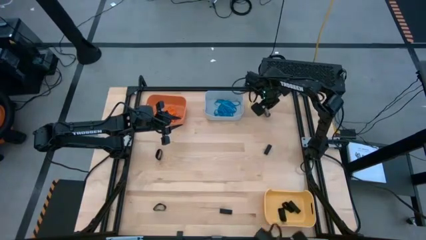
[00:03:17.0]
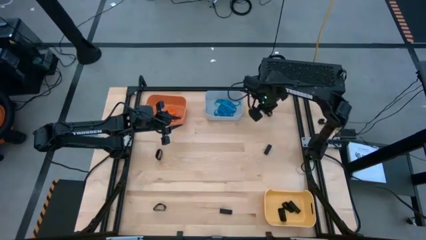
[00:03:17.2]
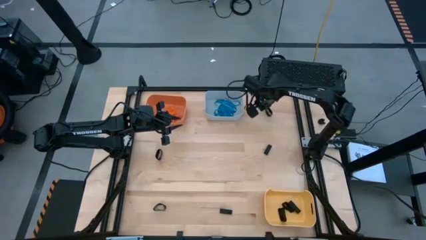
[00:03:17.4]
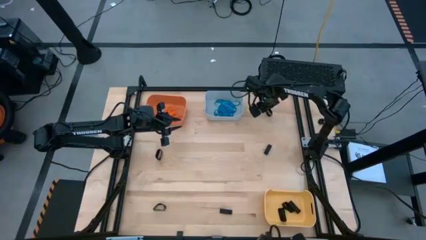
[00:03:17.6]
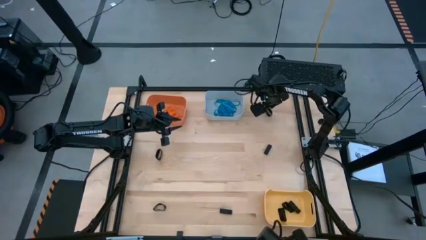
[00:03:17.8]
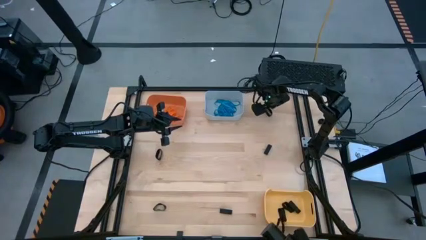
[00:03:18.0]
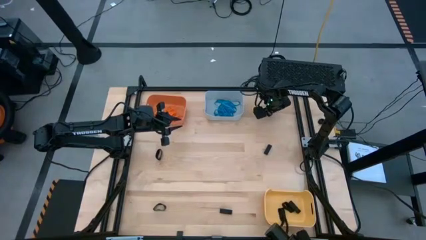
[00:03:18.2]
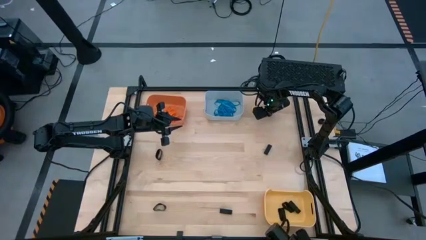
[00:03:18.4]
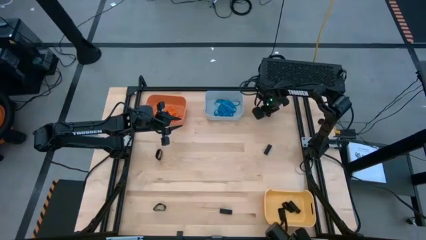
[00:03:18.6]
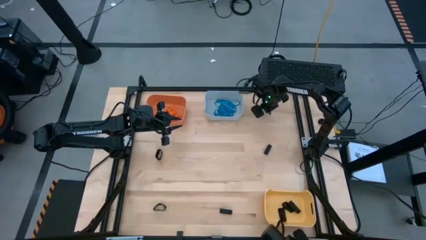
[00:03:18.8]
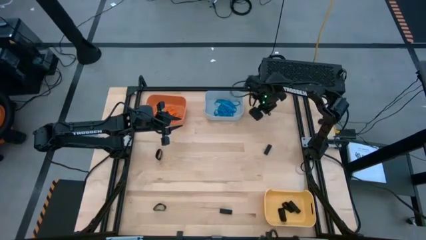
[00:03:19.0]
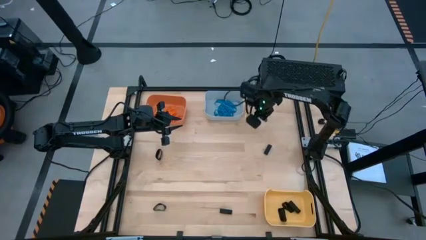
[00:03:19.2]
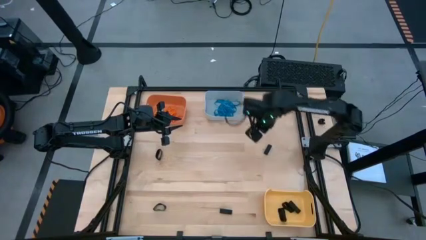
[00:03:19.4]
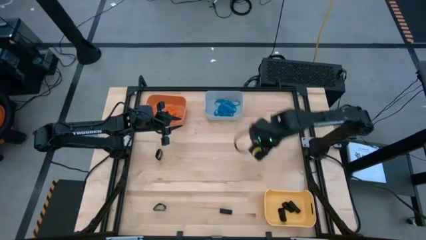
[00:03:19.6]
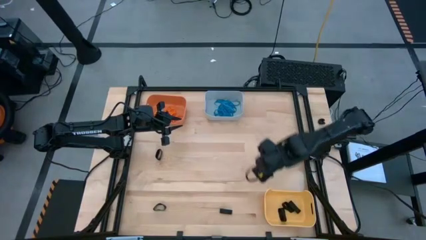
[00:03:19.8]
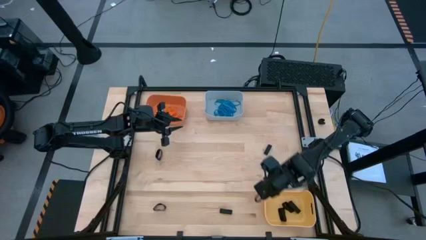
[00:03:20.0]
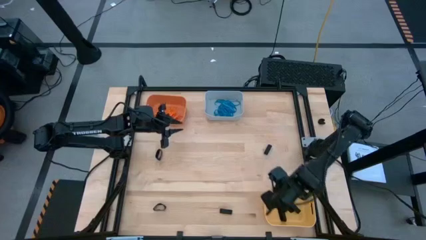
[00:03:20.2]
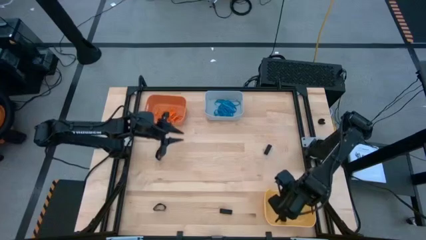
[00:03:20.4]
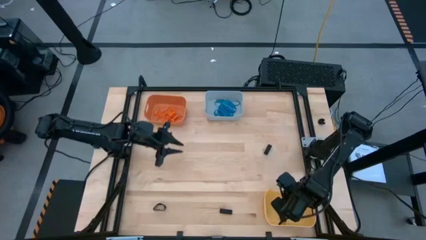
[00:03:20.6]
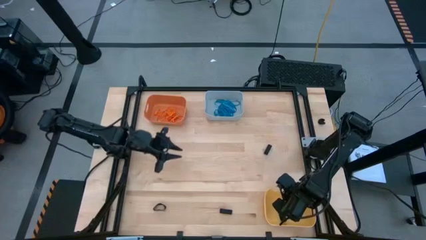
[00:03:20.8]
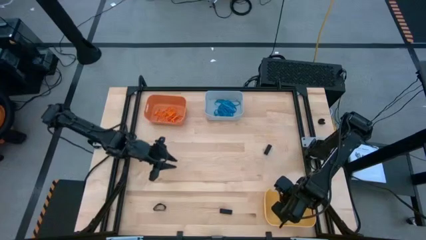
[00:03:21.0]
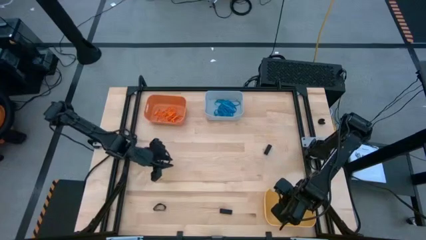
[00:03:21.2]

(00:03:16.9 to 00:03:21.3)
Task: Sort rubber bands into baskets
Put the black rubberband into the yellow bin

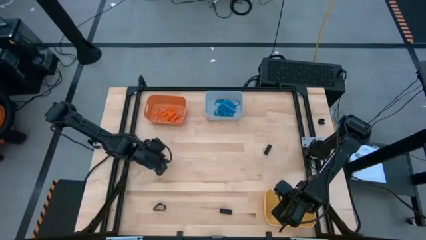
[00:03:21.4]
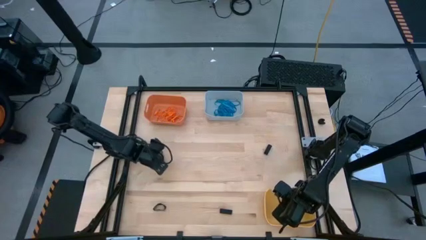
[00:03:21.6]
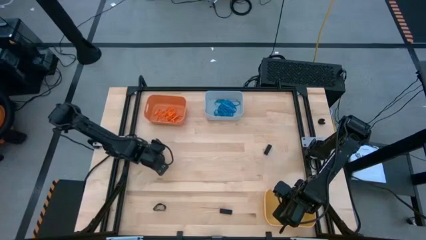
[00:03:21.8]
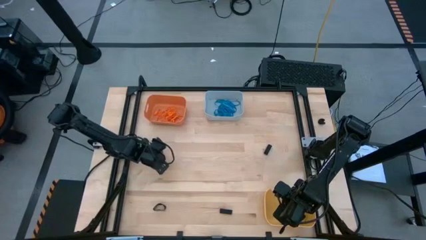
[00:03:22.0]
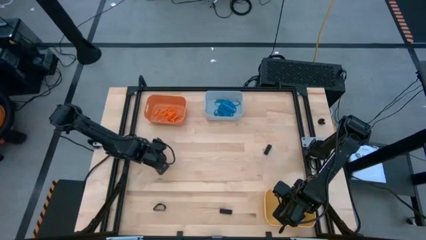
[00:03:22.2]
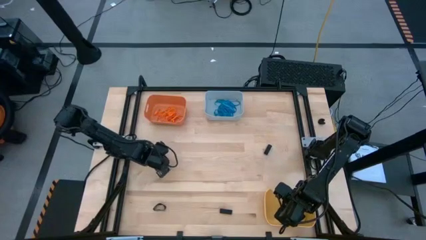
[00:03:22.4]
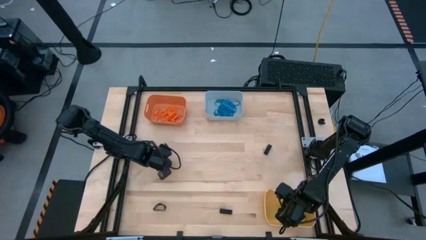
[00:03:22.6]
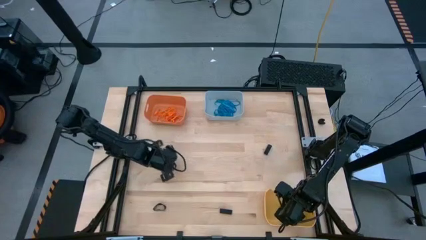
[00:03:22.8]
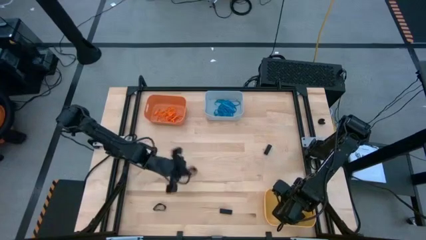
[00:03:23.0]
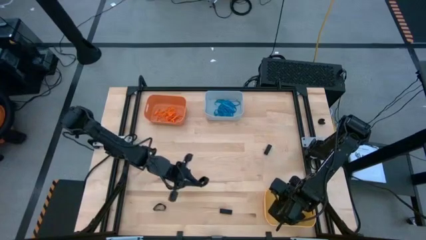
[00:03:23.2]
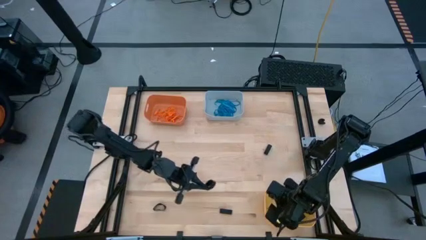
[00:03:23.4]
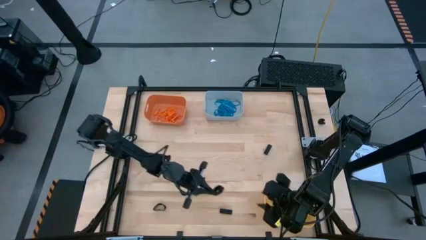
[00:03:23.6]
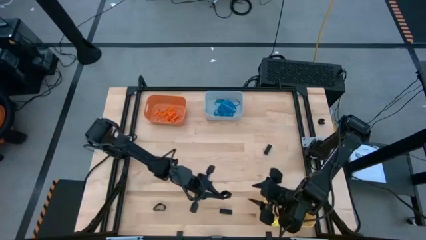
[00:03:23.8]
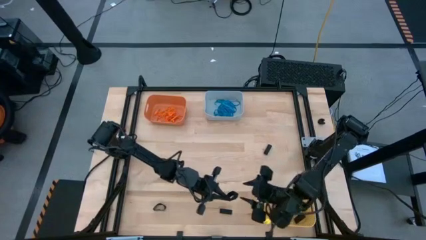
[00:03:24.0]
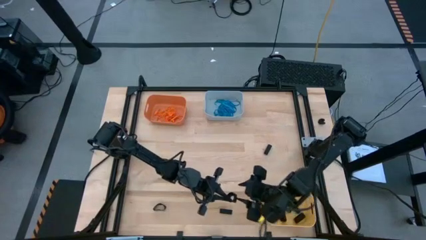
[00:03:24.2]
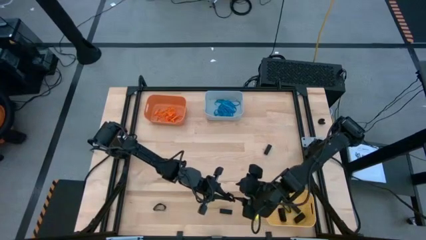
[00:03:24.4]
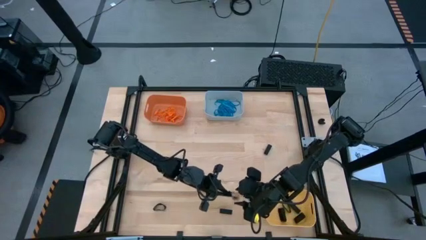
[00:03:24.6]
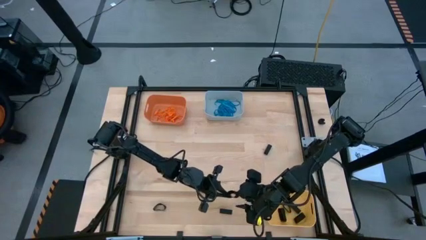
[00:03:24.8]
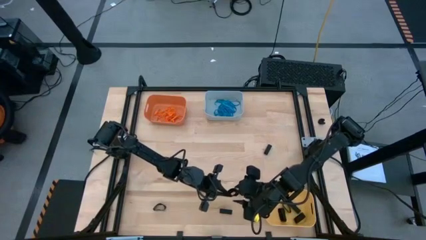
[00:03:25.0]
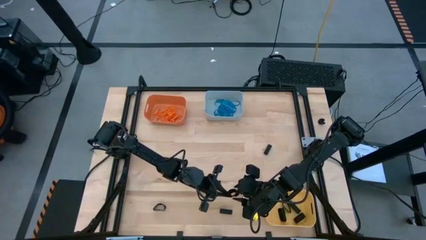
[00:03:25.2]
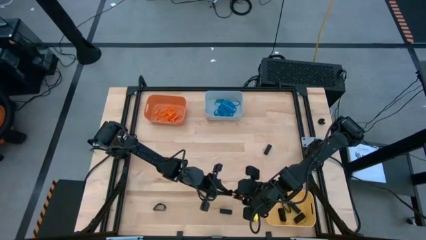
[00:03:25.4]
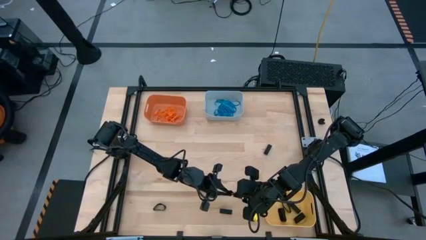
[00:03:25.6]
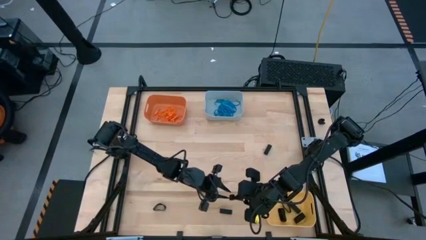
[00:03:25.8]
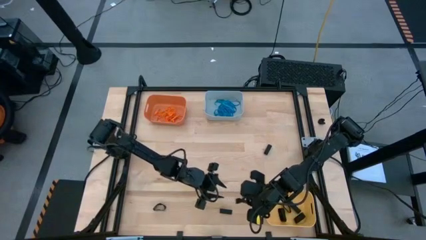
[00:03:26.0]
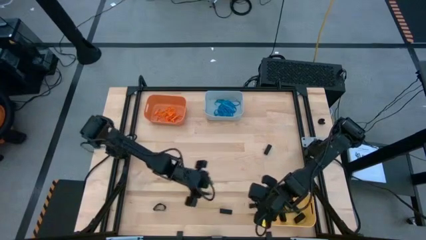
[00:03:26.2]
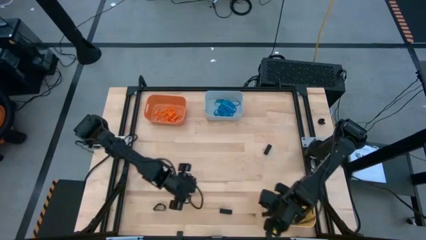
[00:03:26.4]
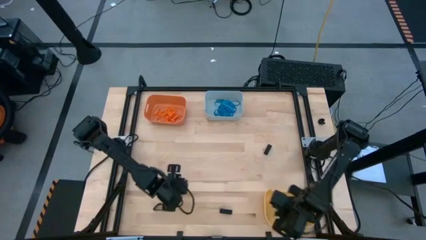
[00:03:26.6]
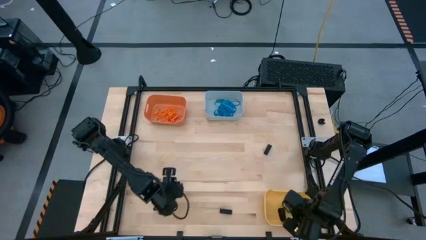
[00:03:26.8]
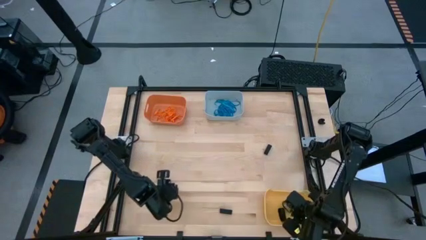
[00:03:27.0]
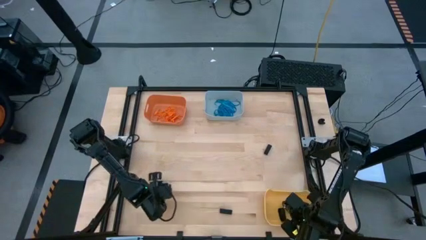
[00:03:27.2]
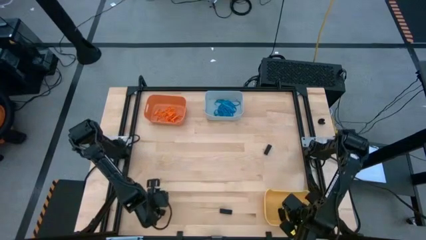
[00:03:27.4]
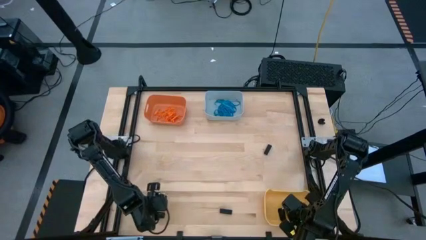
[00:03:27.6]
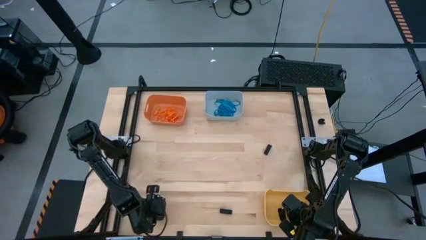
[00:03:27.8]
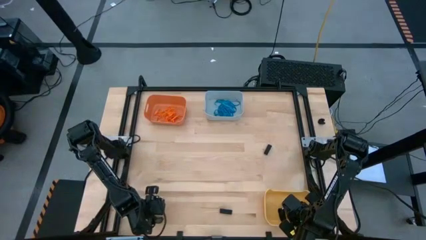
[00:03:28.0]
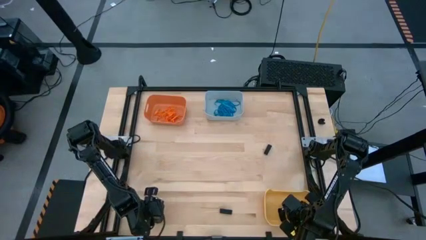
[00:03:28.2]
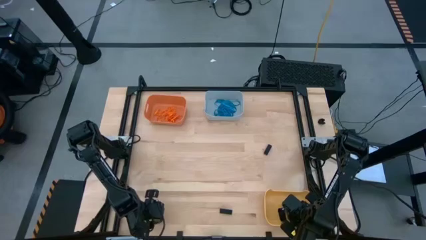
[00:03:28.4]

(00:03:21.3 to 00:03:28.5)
Put the black rubberband into the yellow bin

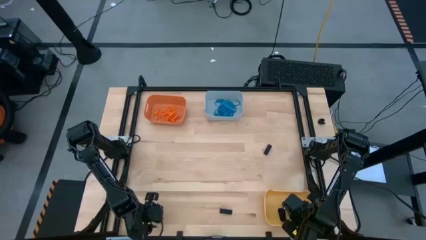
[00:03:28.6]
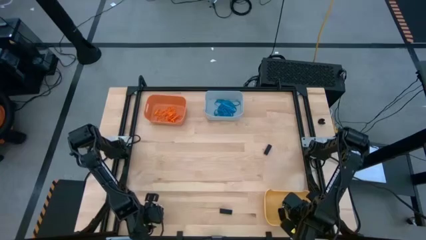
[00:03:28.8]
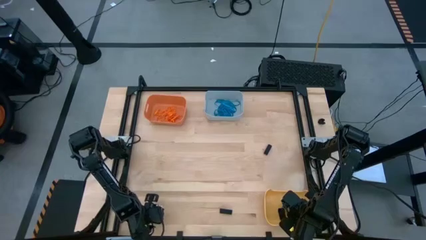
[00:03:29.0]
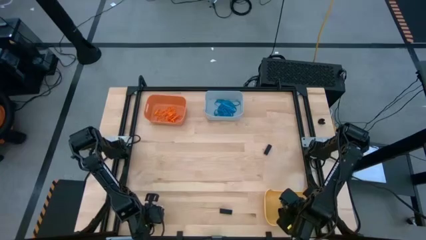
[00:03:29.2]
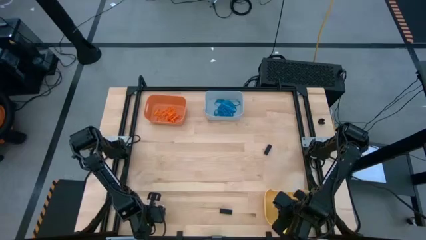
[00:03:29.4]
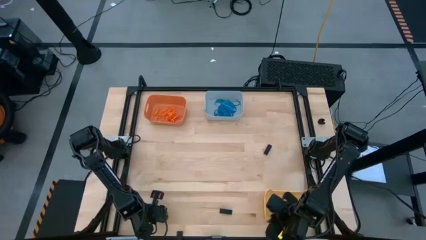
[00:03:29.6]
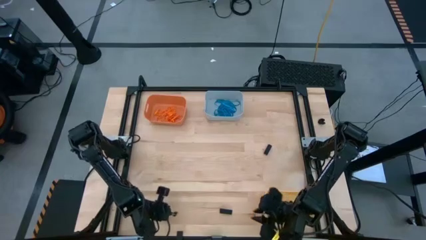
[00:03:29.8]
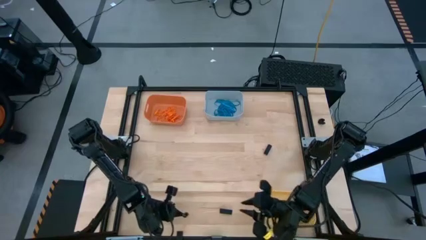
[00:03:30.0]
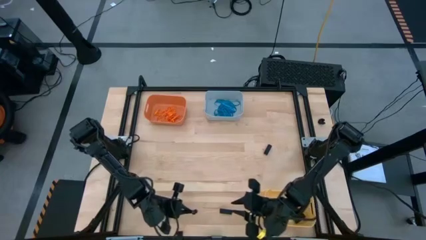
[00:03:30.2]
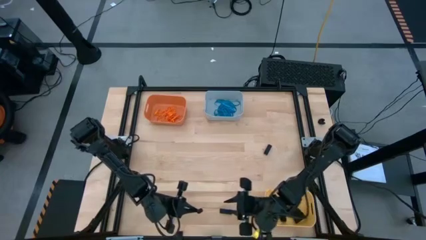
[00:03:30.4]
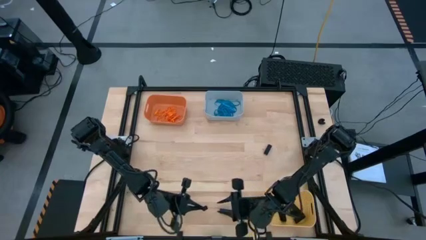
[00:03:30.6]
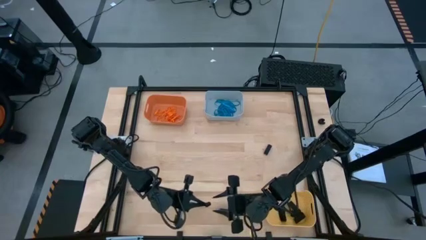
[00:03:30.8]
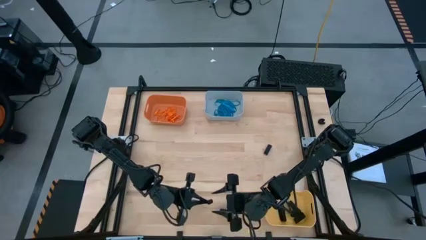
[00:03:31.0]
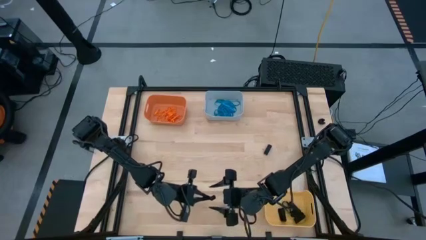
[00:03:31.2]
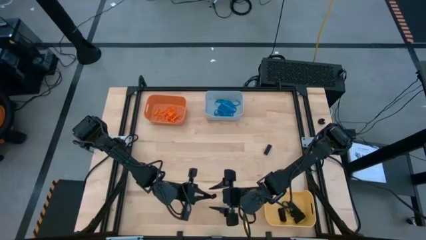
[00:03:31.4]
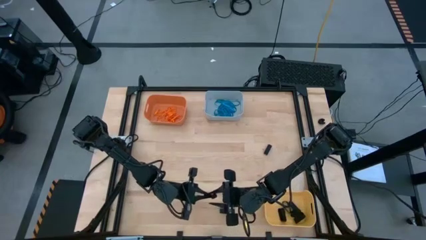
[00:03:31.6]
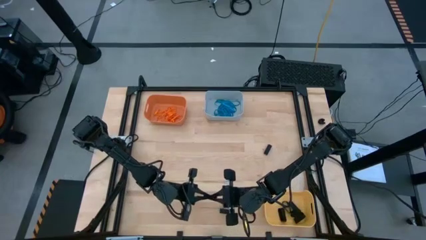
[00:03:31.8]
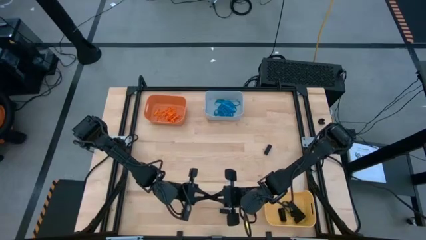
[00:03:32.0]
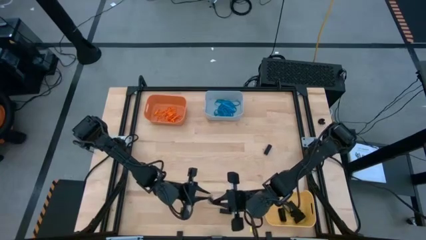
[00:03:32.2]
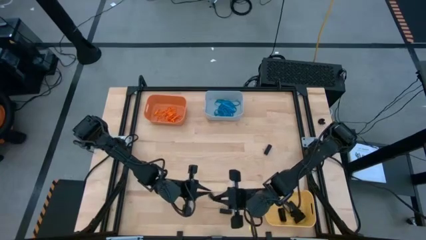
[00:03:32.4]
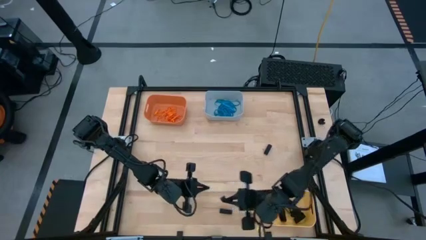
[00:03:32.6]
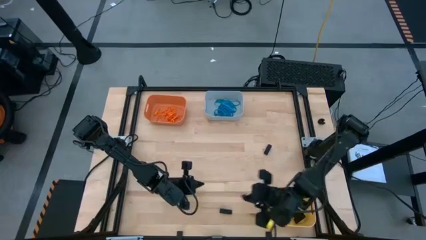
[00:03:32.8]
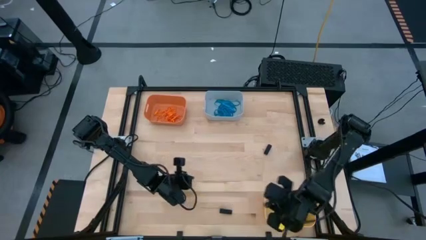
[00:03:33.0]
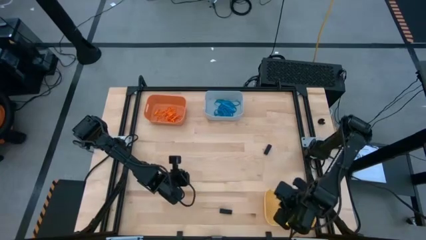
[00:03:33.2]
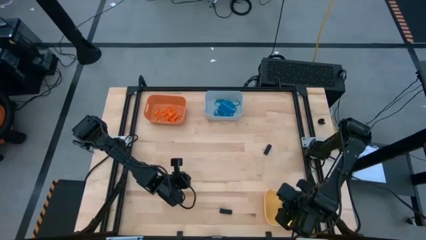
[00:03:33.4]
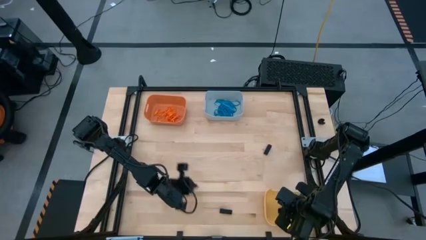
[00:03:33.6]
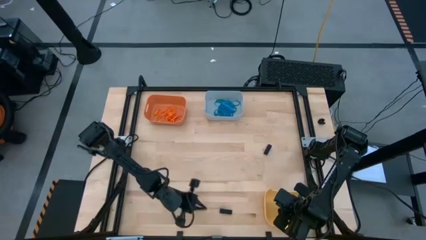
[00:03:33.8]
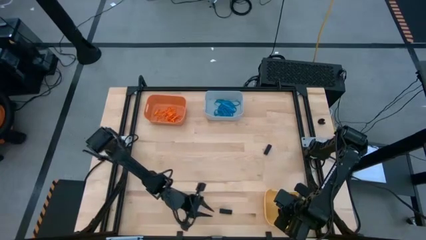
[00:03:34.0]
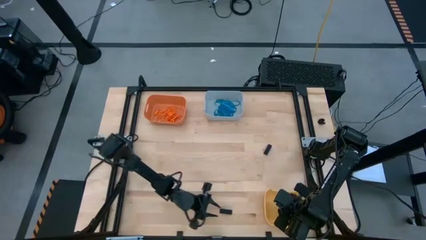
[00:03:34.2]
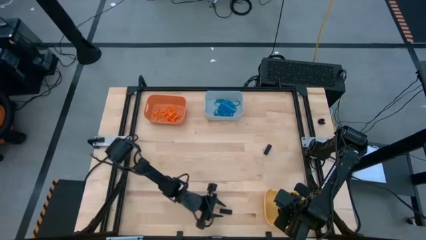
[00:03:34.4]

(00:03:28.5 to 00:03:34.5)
Put the black rubberband into the yellow bin
